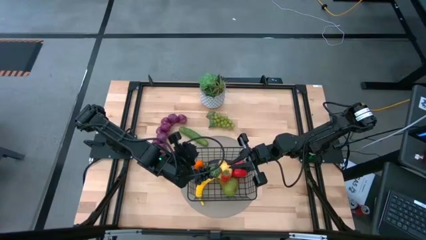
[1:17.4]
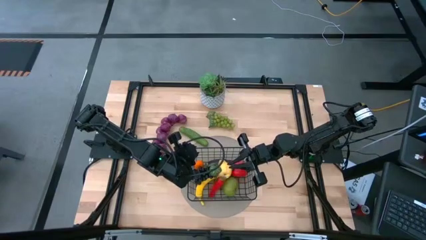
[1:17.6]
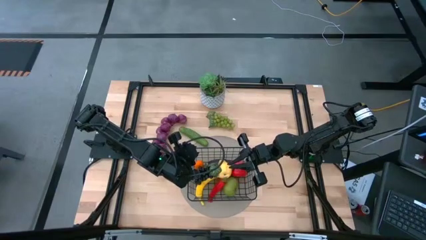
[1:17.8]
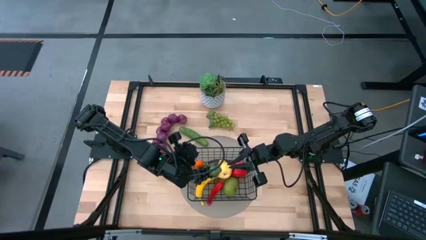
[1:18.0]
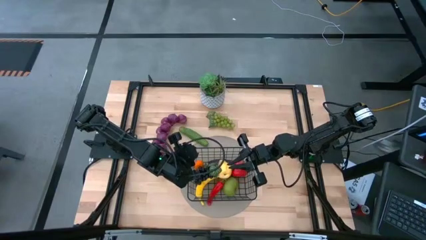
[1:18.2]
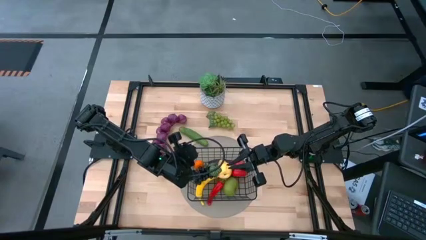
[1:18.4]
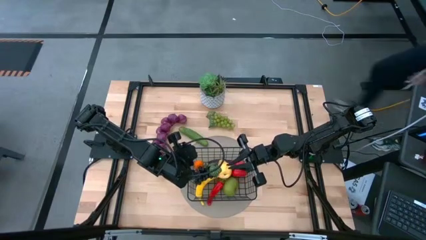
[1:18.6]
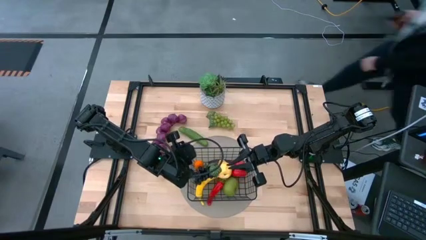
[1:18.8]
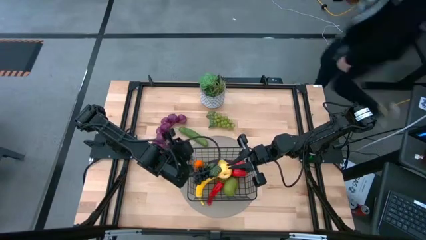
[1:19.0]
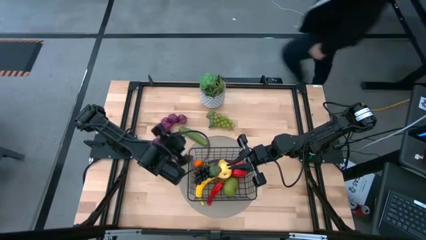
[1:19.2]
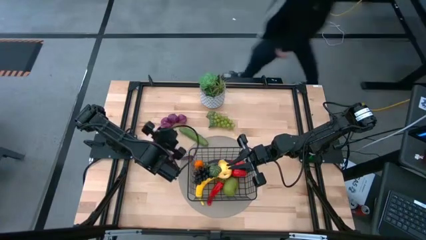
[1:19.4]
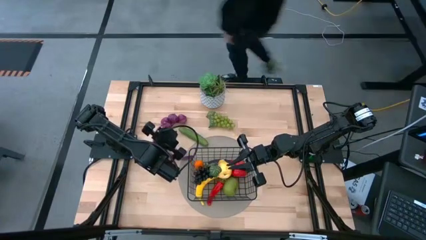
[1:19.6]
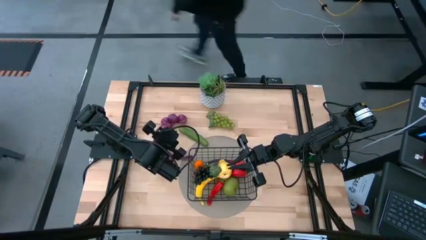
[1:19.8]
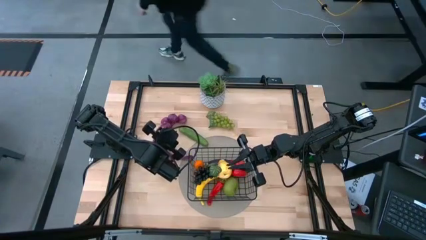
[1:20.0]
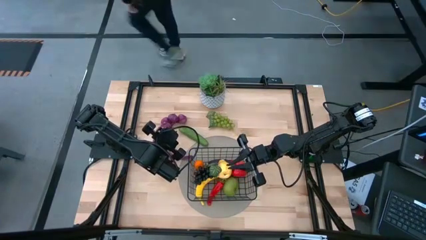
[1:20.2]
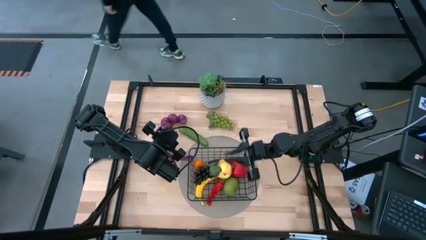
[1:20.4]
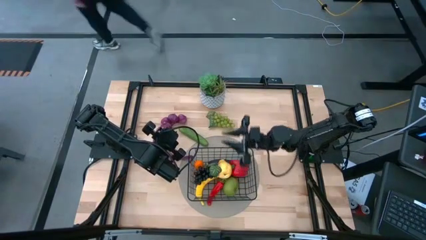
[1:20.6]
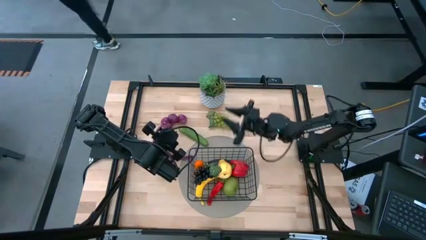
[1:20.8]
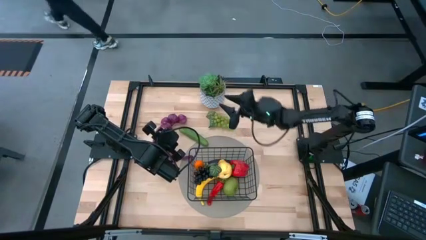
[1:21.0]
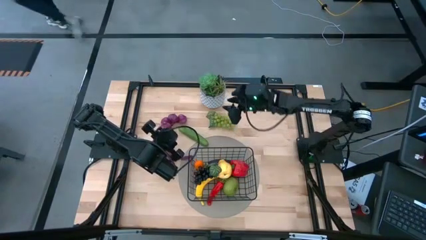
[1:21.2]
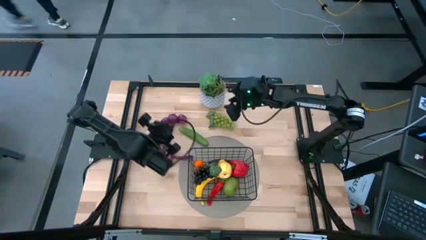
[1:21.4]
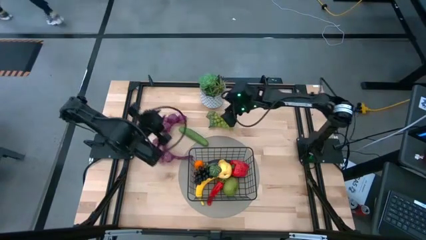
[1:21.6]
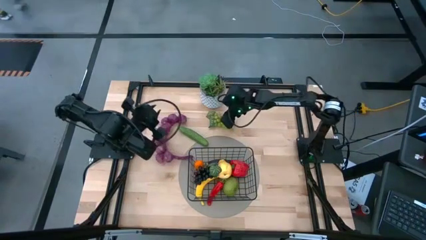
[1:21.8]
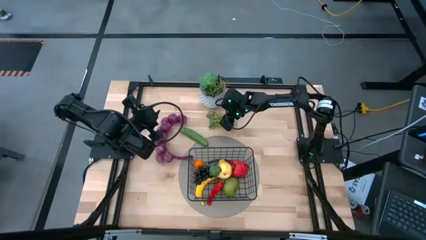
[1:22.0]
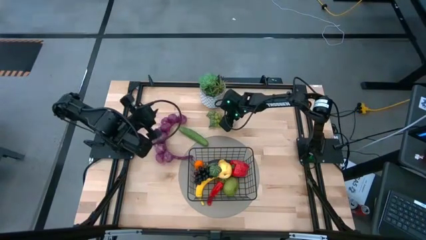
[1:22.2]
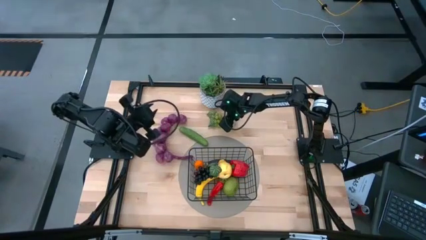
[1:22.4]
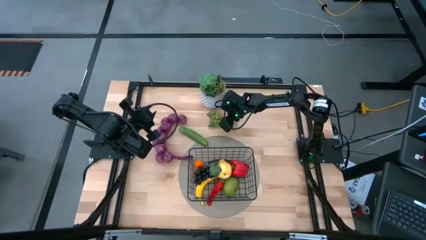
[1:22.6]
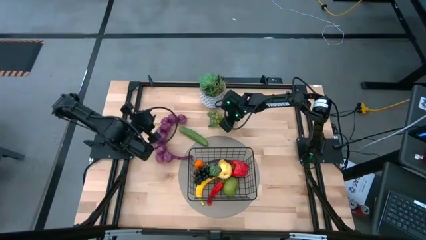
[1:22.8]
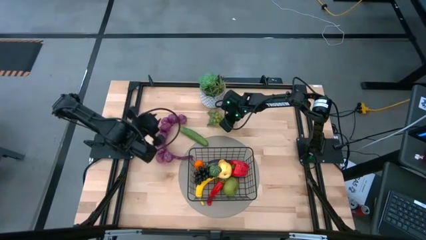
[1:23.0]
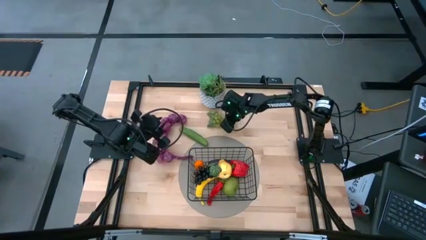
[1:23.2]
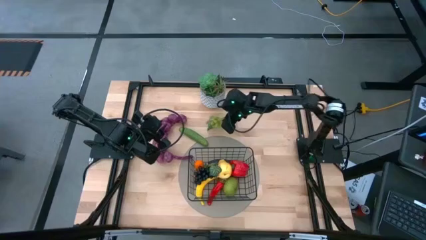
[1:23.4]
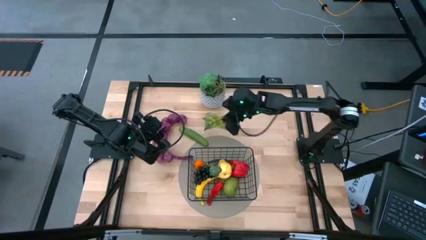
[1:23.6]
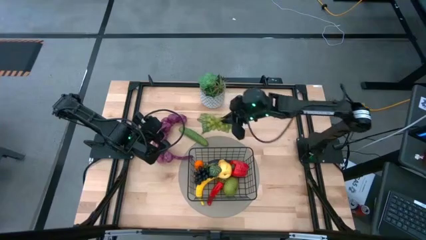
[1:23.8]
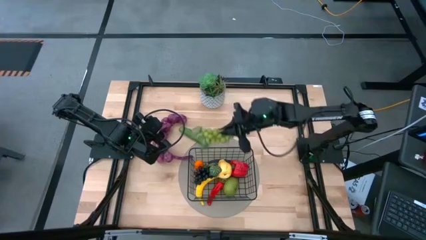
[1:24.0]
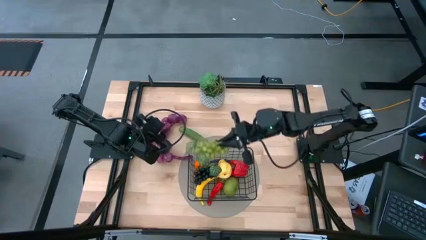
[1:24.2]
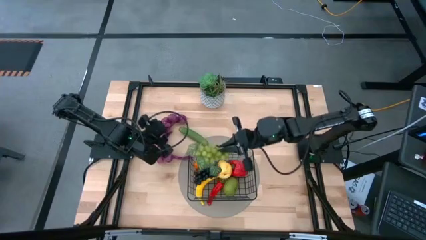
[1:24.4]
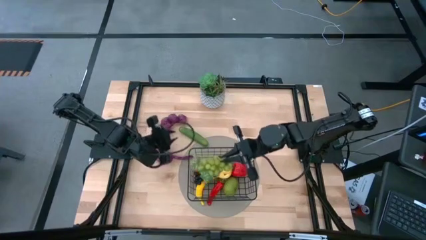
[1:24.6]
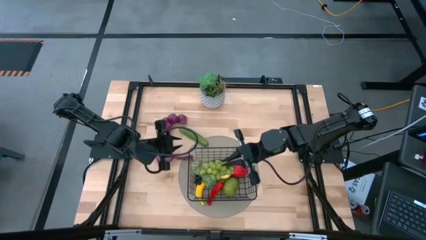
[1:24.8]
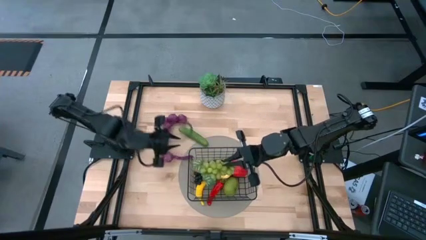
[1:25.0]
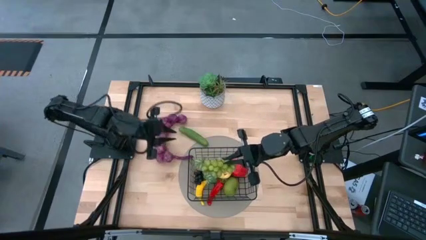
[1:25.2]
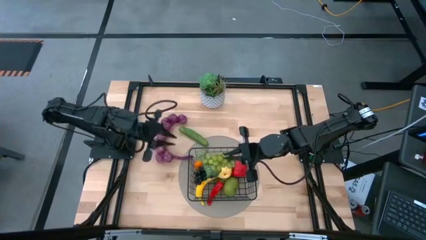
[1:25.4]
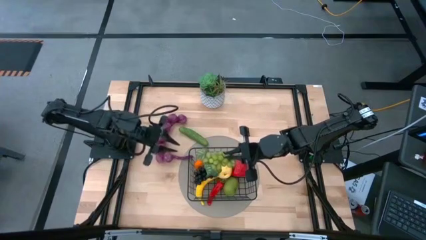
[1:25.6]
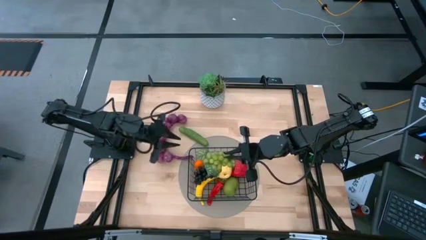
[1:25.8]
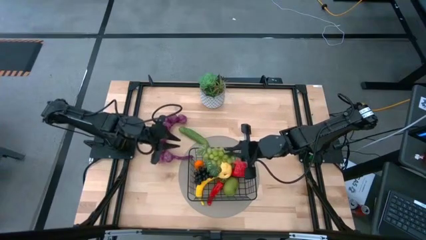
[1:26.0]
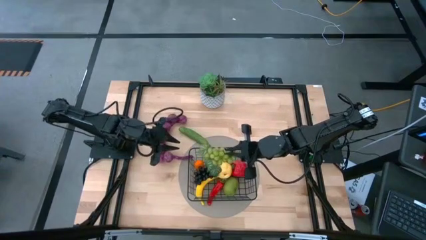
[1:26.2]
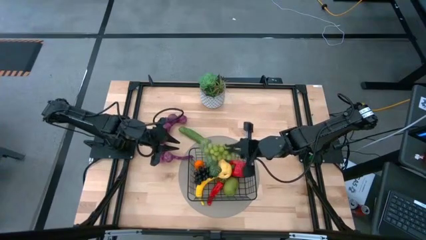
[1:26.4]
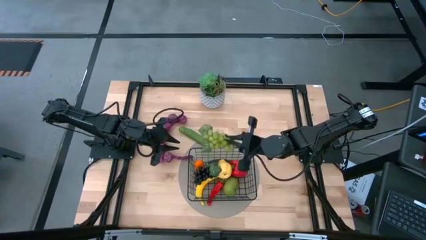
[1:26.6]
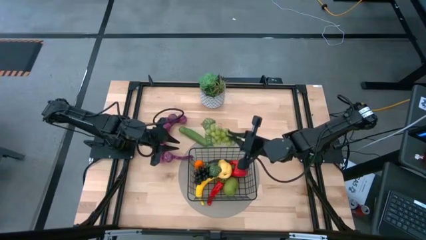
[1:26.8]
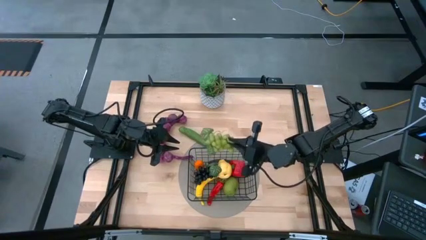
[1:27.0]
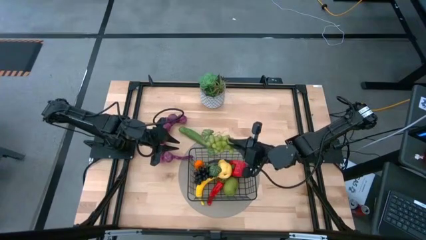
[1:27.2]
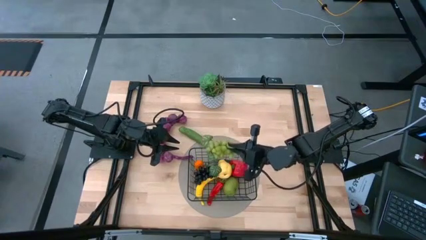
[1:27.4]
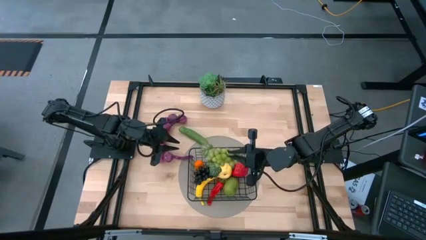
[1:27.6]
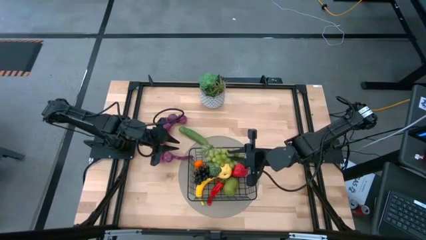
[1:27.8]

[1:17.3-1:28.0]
Task: Build produce basket
Put the green grapes into the black wire basket

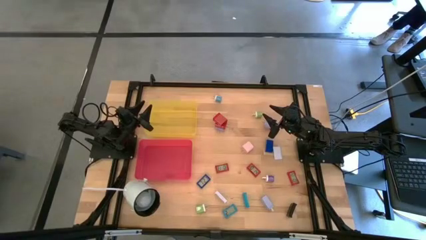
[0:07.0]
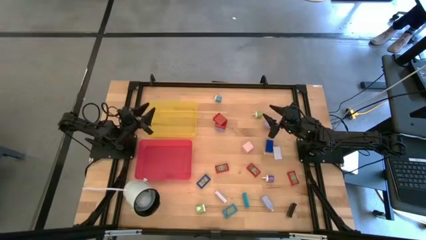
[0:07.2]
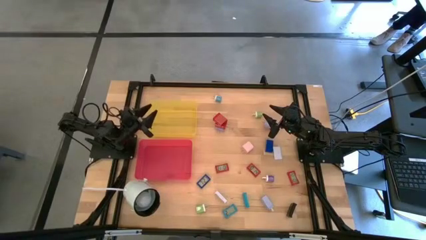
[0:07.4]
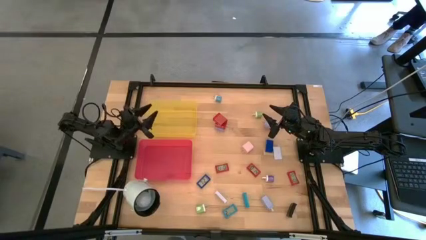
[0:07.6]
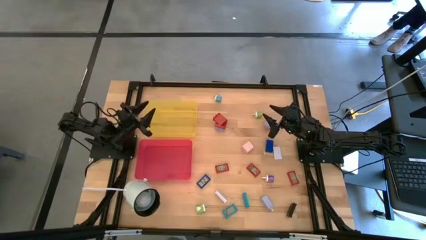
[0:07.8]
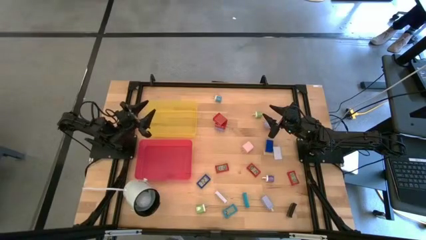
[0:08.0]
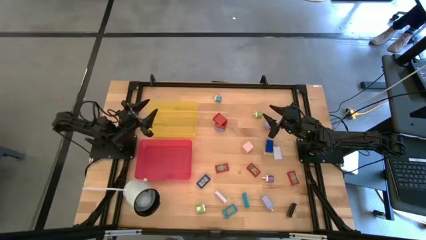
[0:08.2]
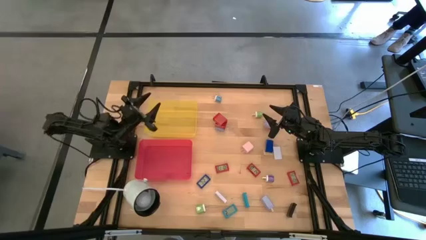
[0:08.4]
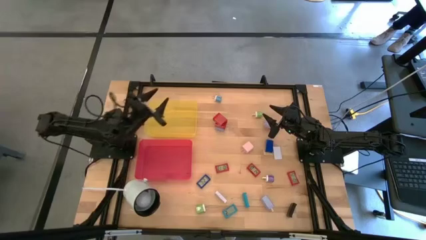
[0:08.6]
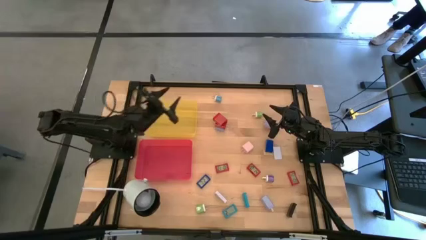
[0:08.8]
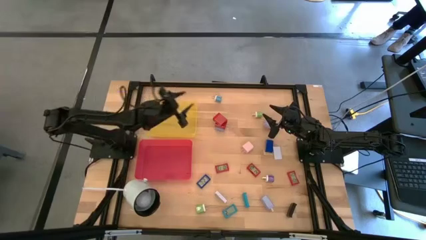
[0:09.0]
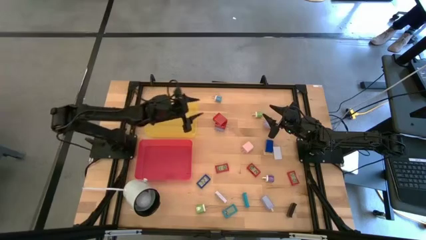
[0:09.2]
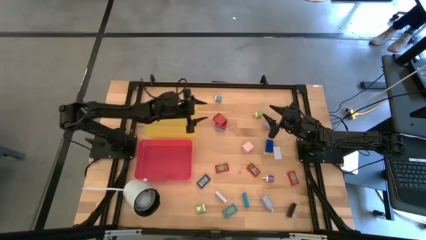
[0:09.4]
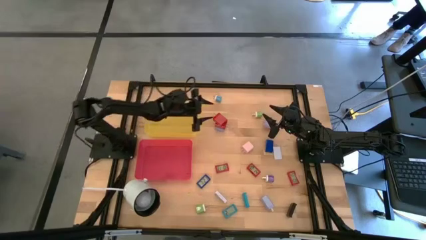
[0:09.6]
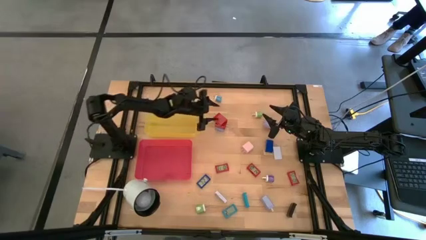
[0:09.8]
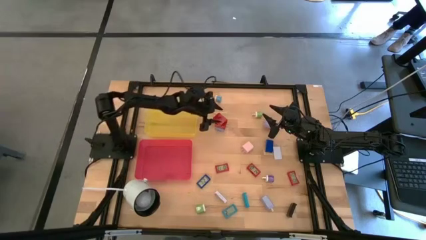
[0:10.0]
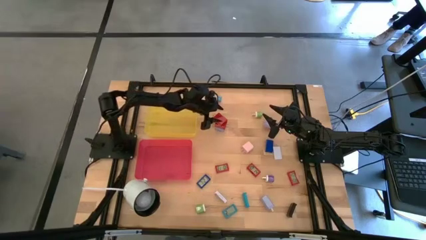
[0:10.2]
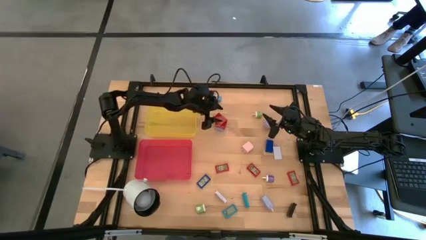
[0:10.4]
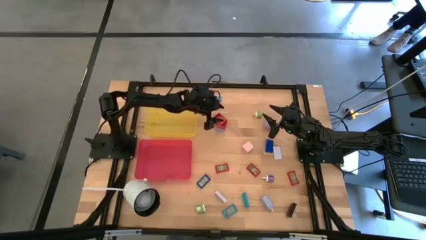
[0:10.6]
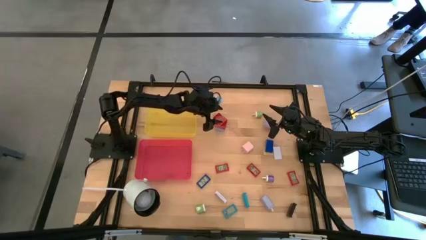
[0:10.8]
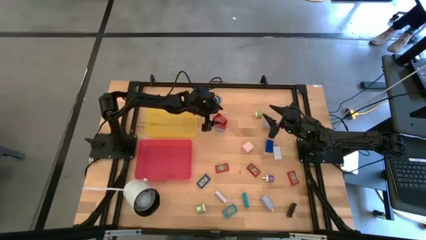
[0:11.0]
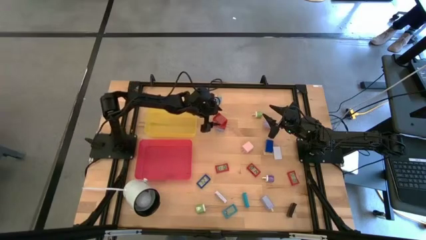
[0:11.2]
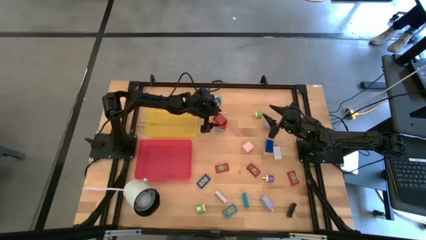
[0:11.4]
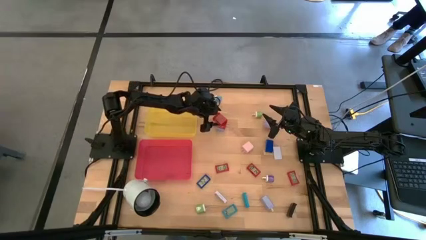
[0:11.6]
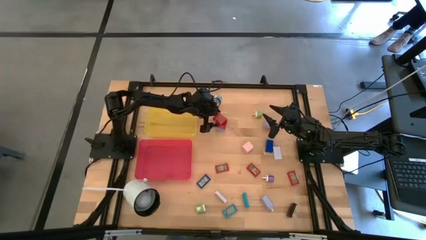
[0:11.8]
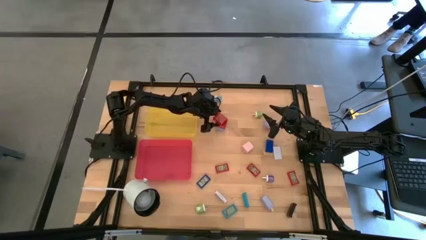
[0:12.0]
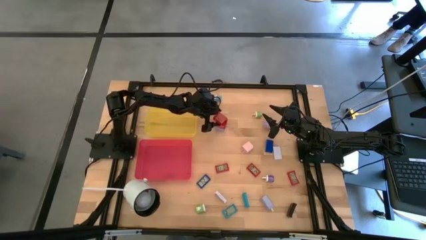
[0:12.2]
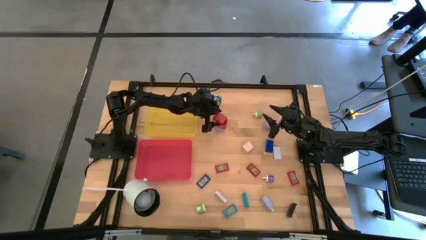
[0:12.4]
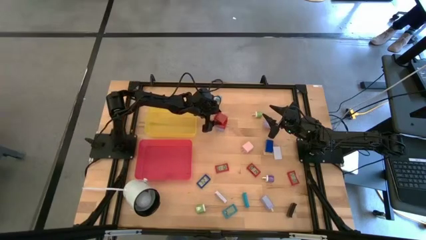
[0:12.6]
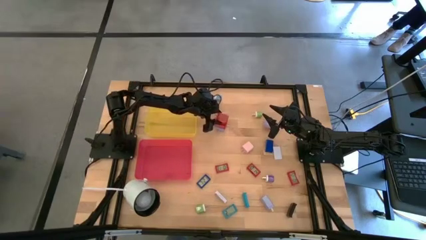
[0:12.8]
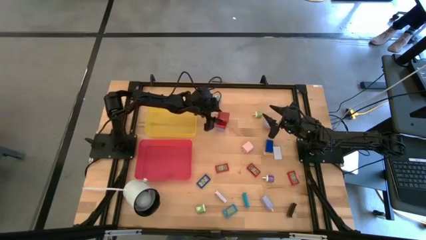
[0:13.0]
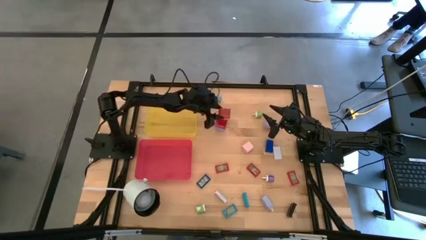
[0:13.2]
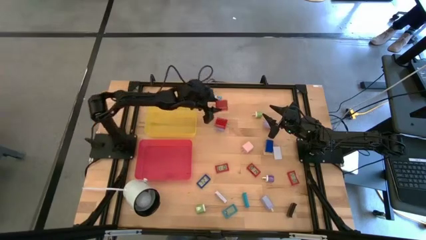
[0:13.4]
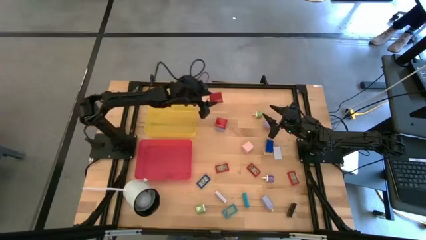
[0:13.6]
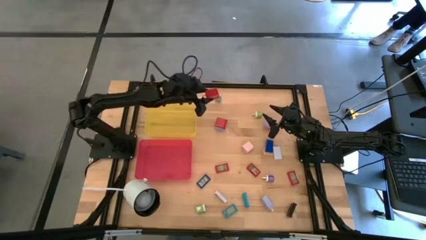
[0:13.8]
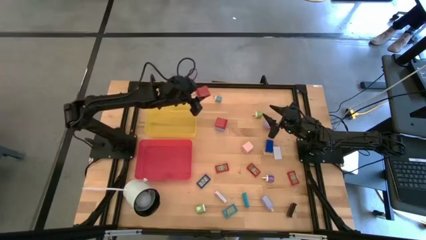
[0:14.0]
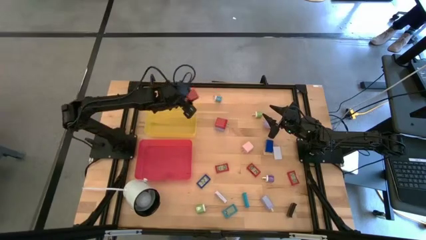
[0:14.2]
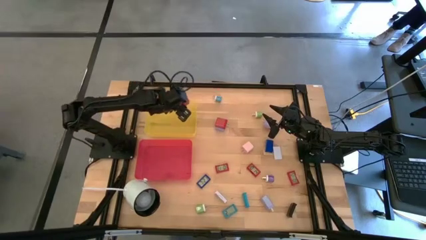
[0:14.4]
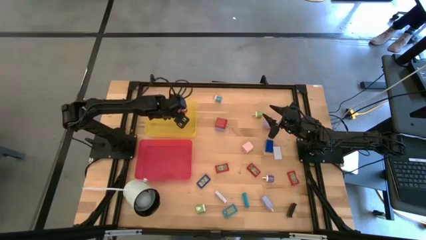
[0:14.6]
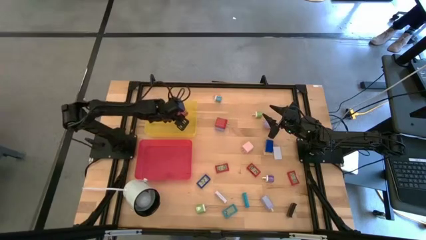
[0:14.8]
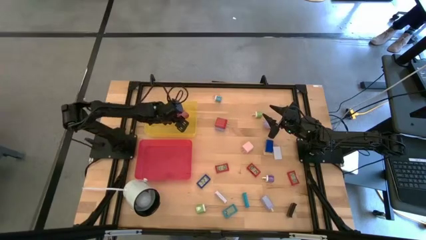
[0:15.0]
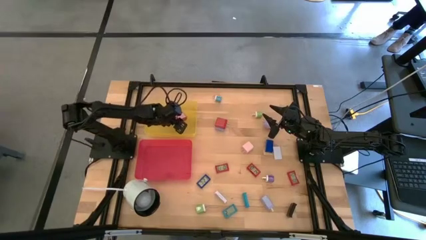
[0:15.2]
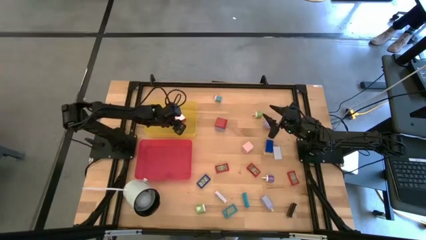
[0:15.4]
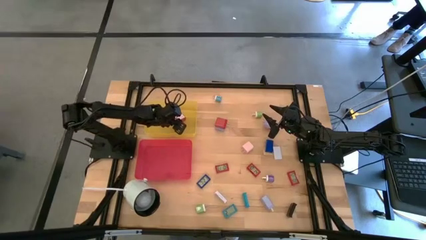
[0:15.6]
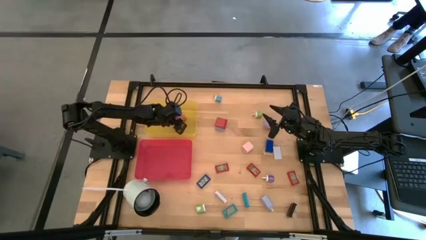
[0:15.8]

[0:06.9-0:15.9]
Task: Pick & Place Office items
Put the red charger adapter into the yellow bin
